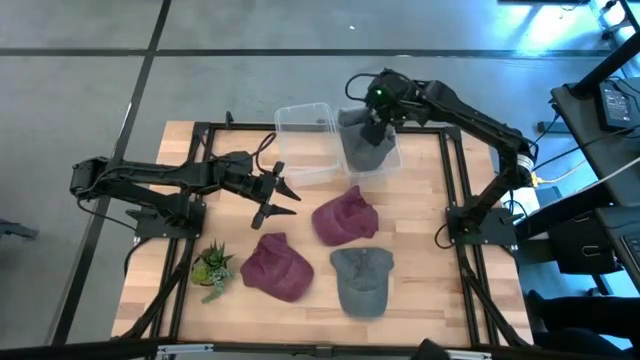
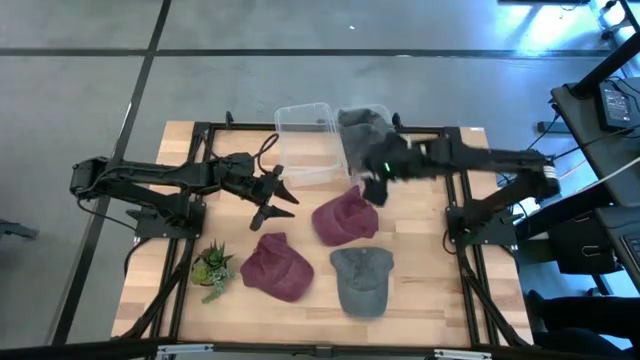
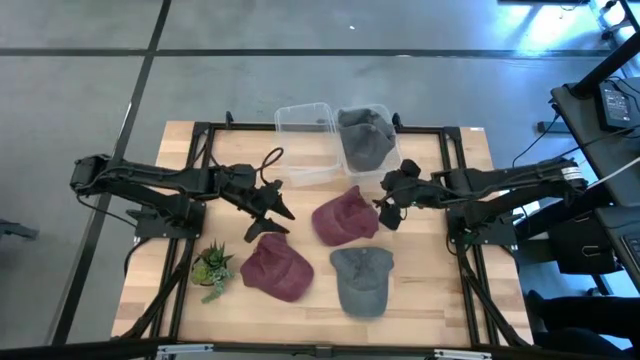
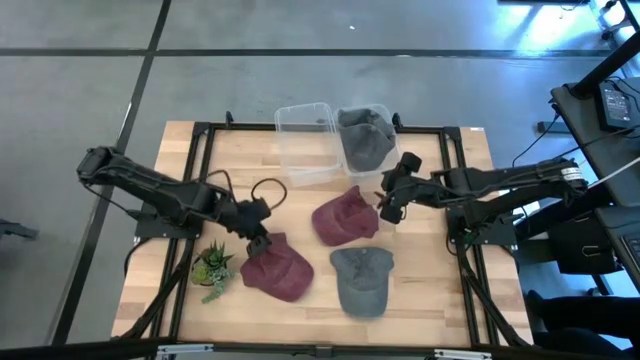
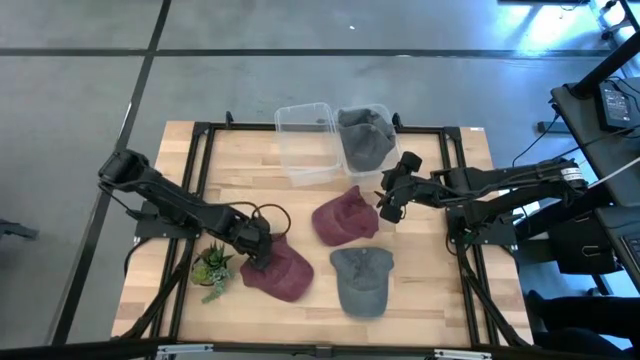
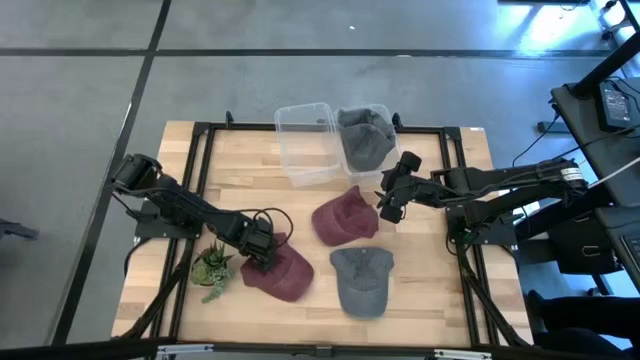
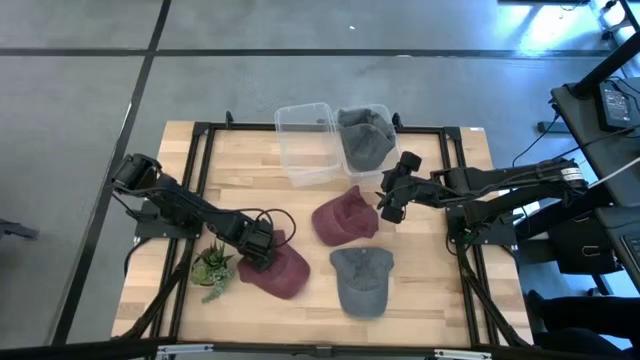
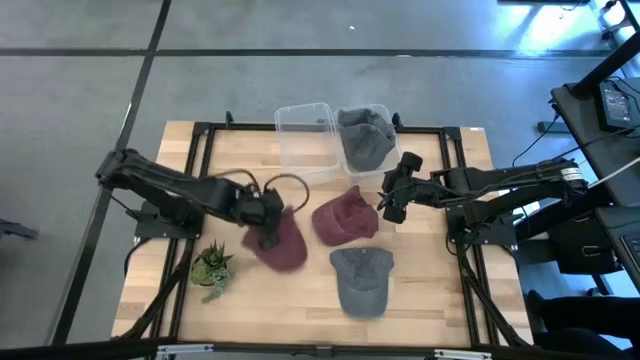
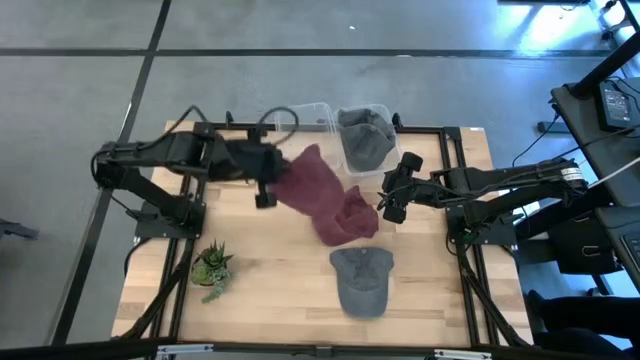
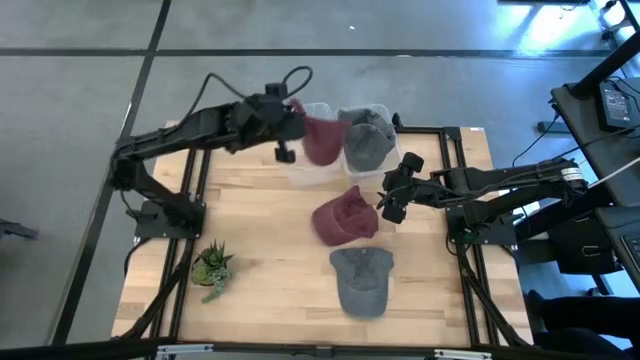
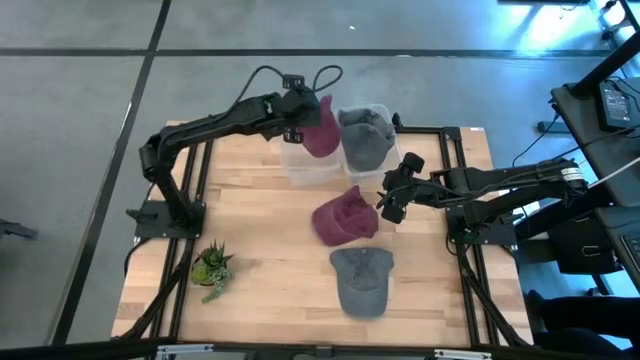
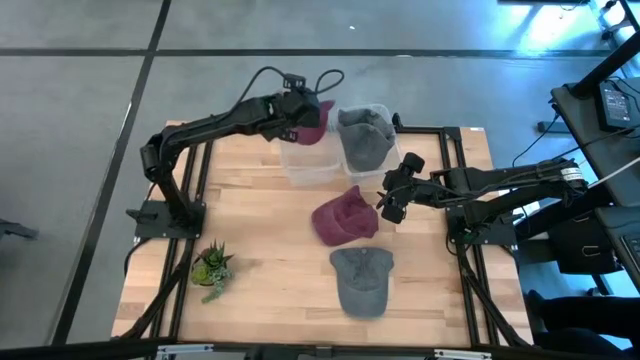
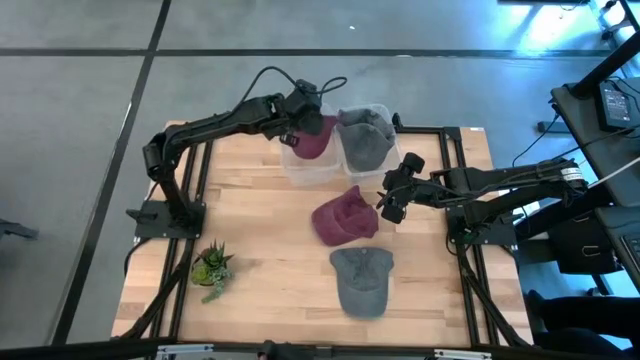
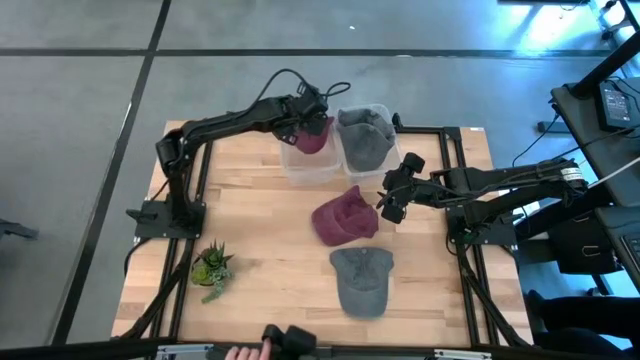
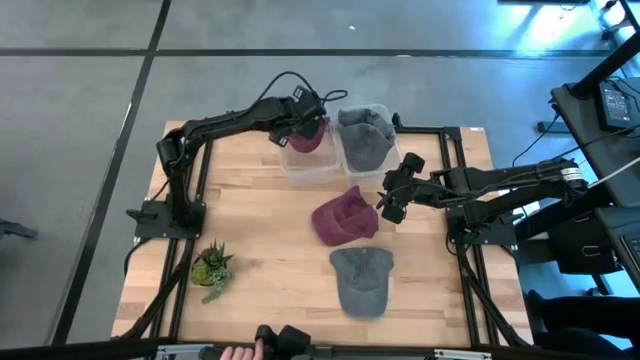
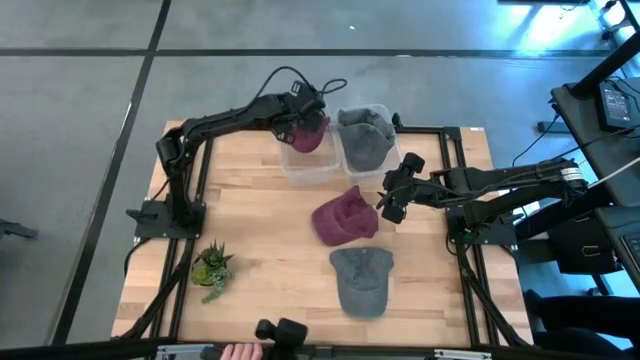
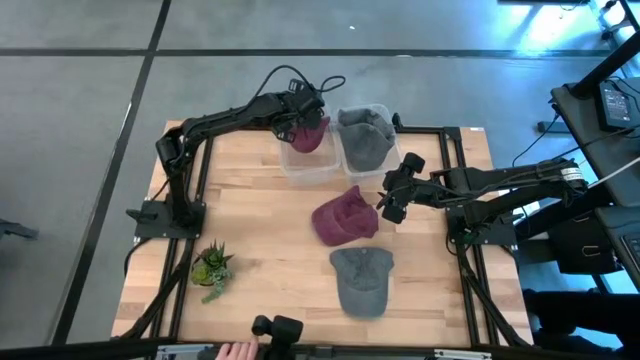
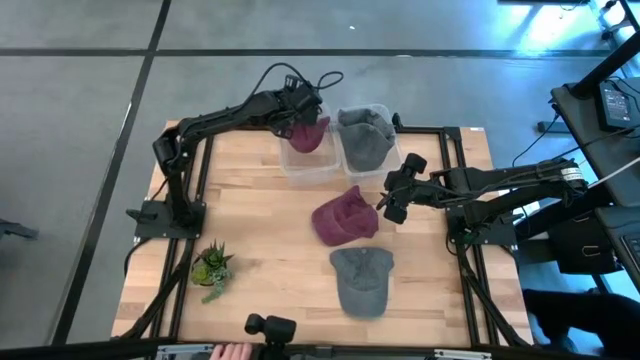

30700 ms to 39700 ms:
Task: Pick & Place hat
Put the bottom red cap into the left transparent bin

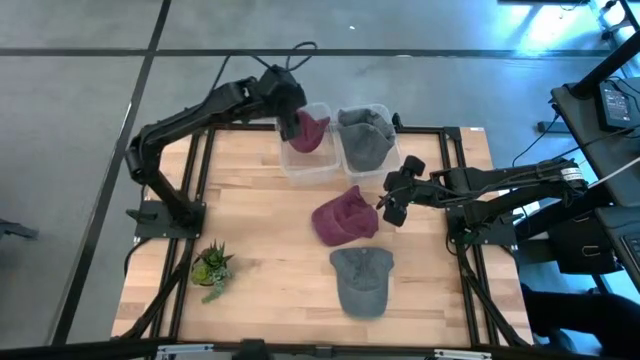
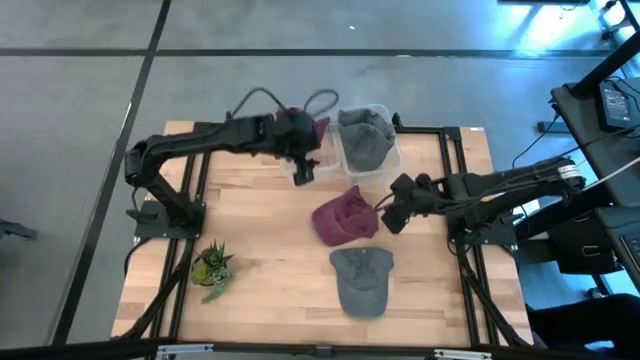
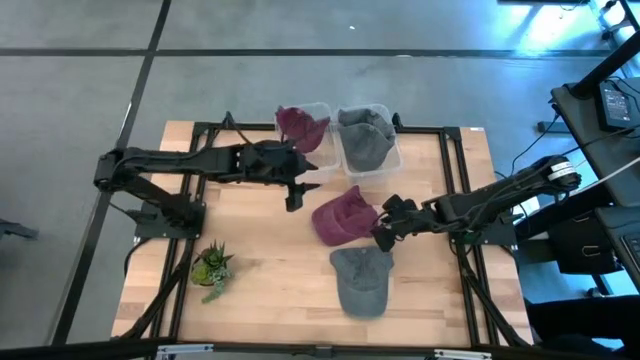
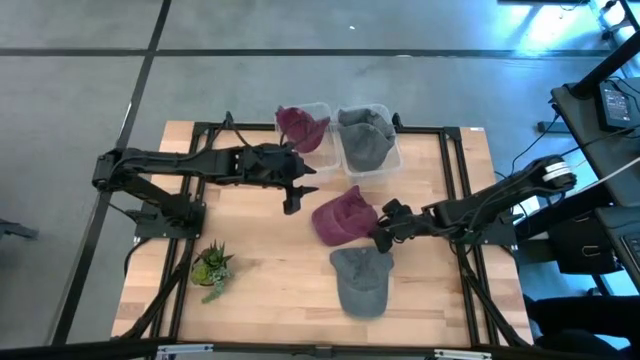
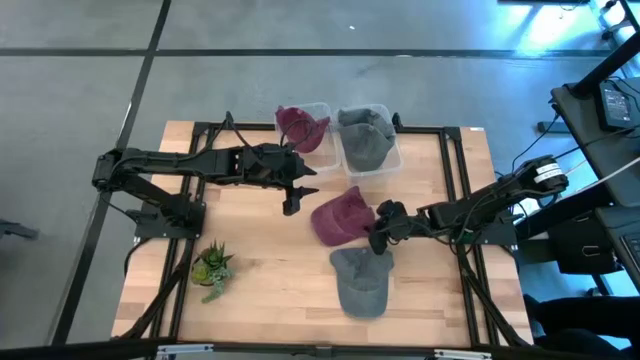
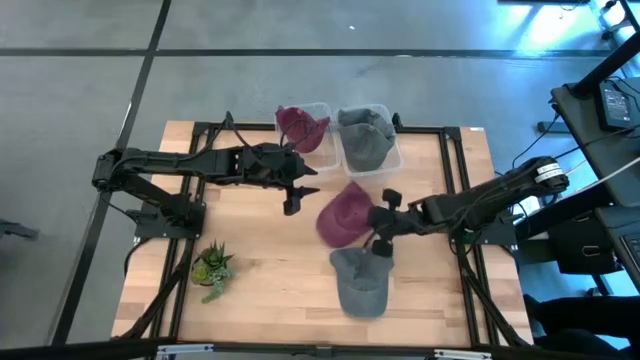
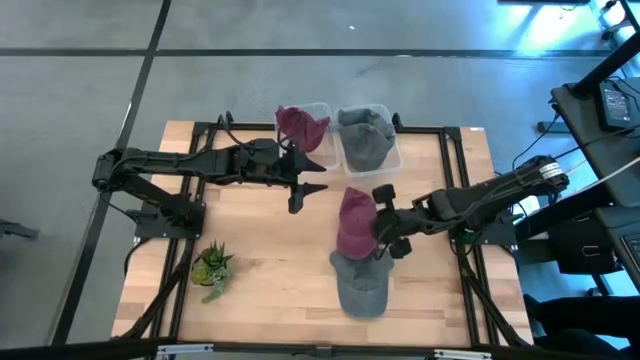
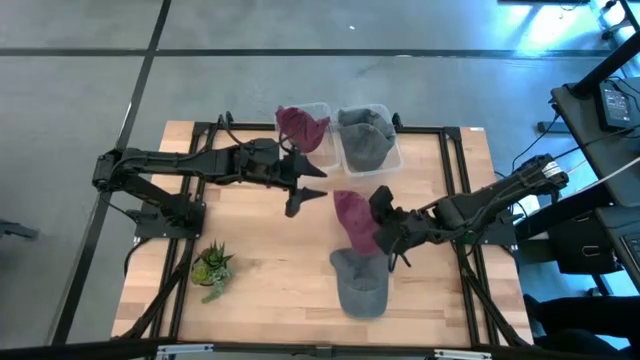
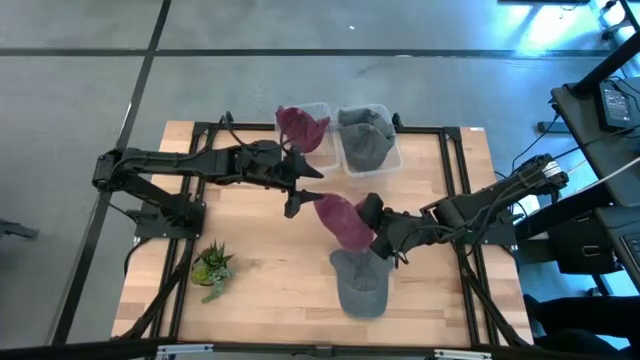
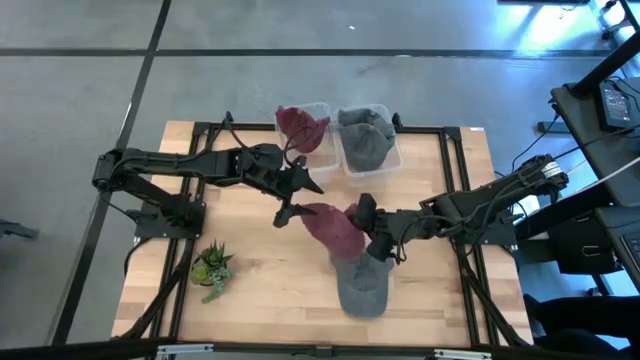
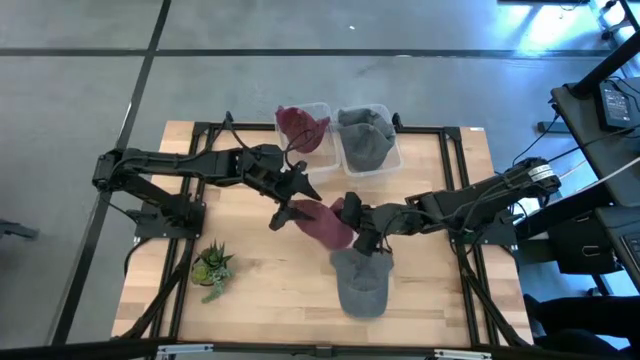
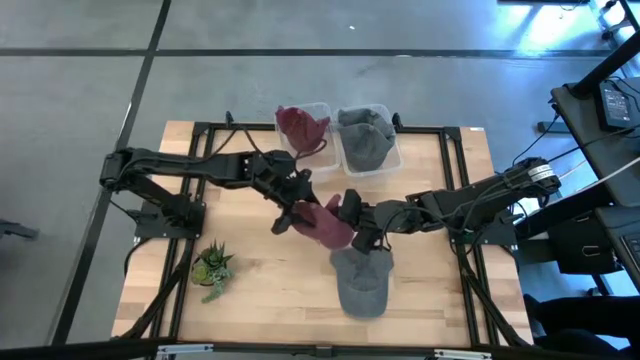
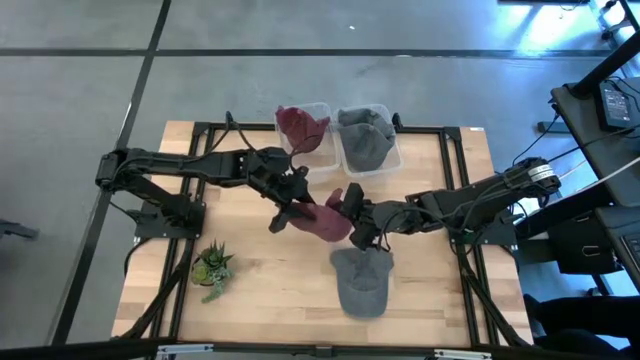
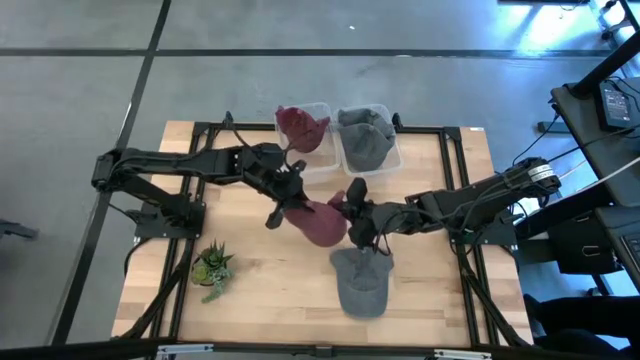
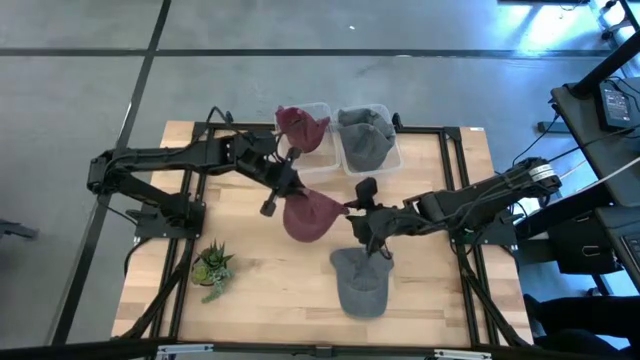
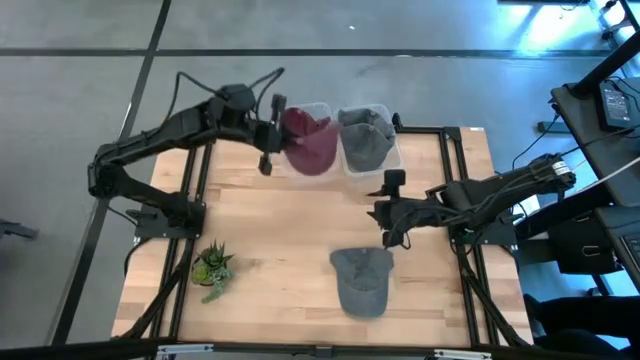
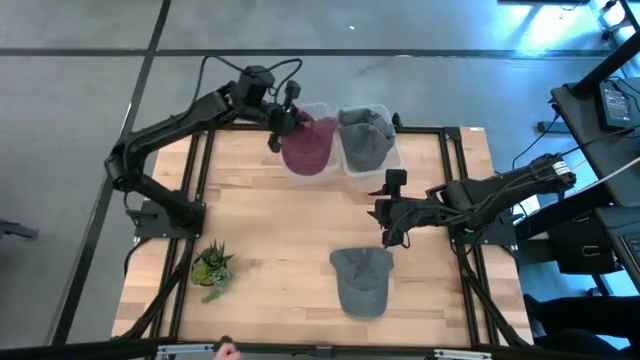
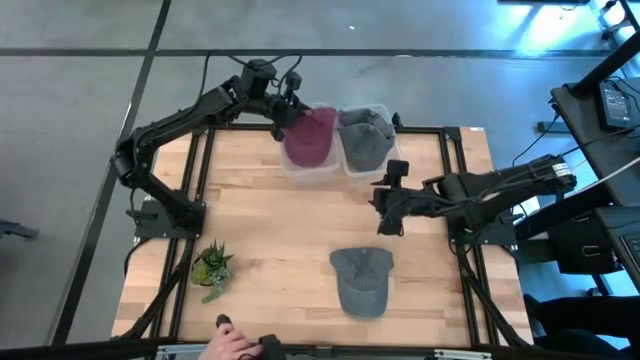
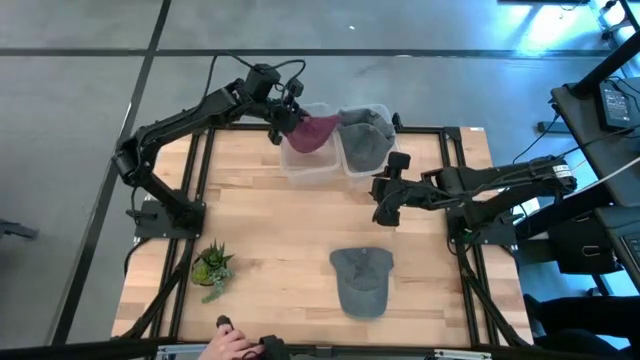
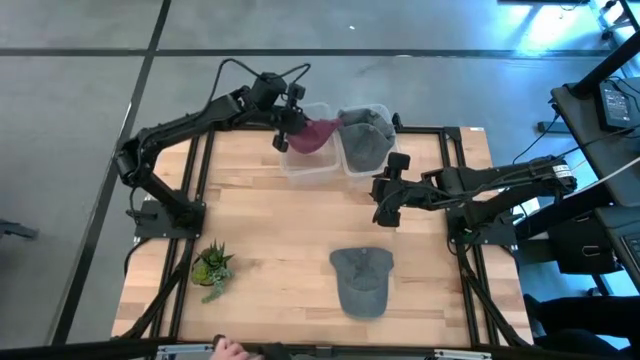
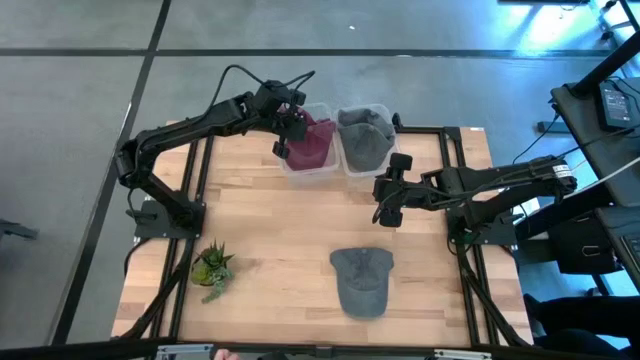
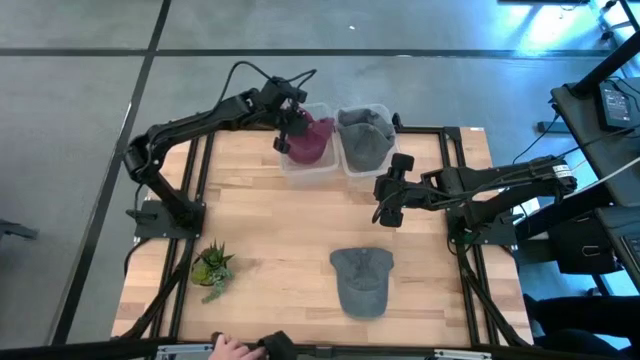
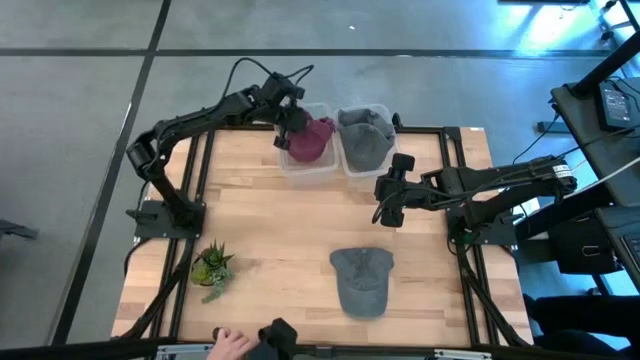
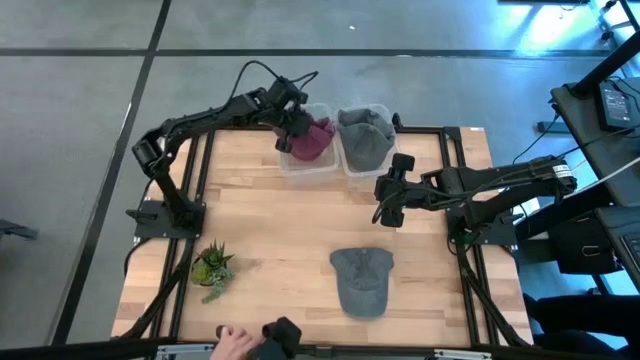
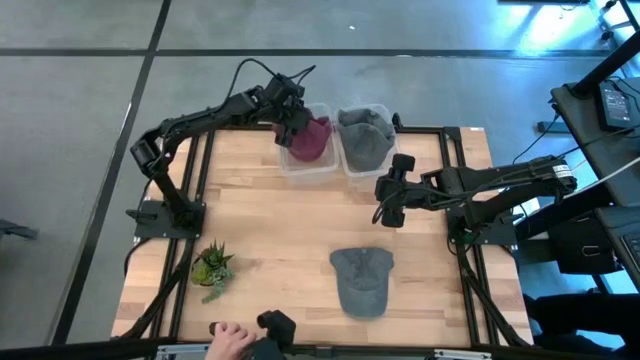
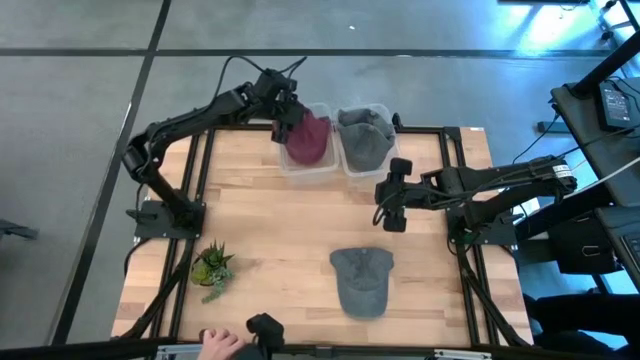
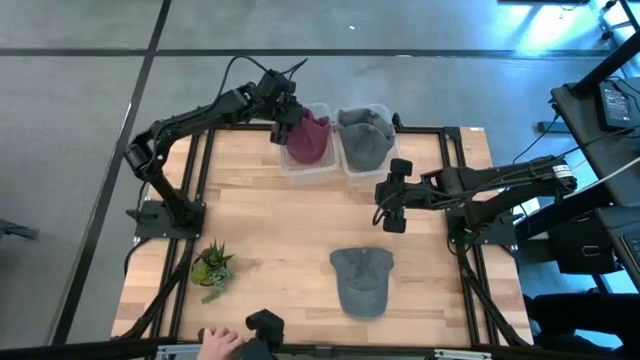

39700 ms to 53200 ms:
Put the red cap into the left transparent bin
